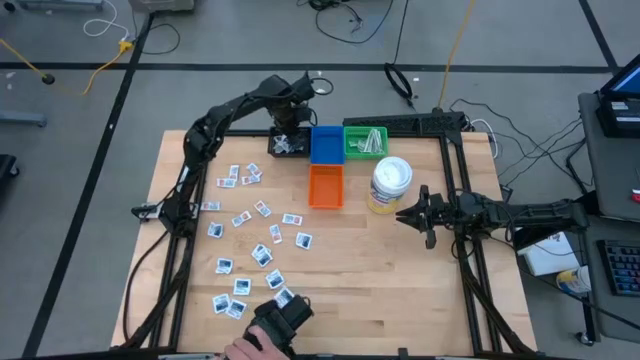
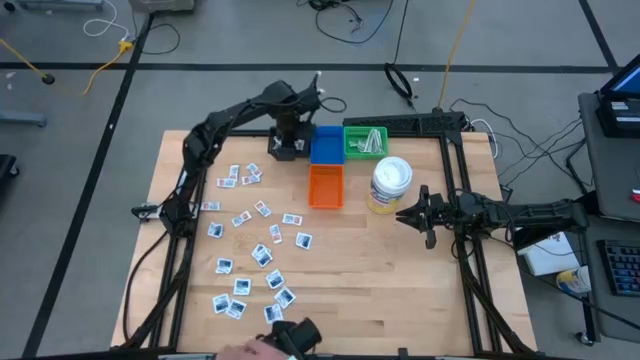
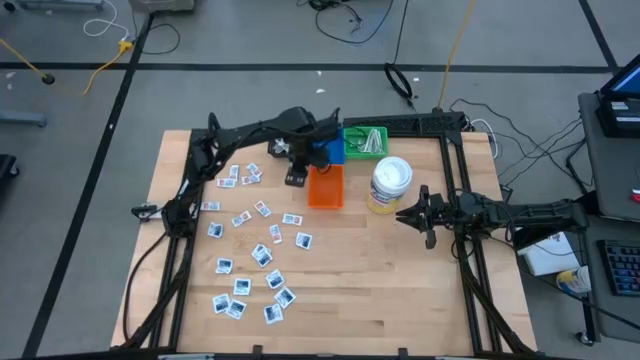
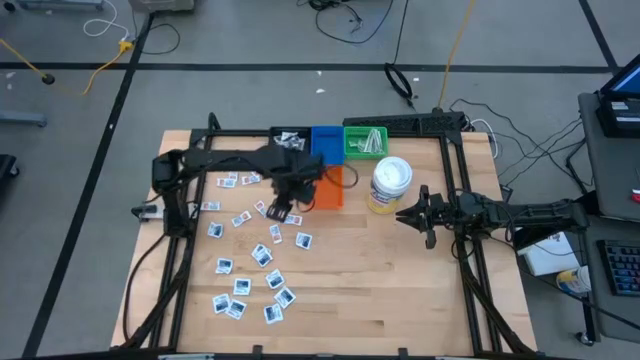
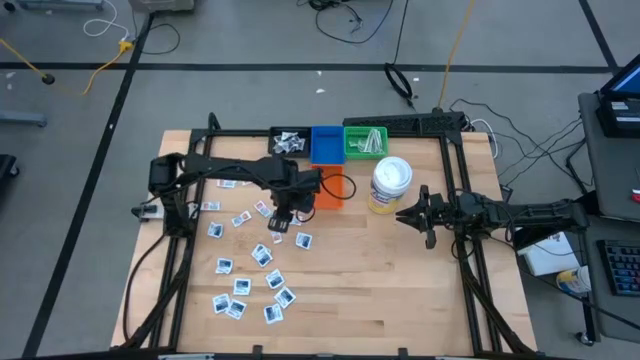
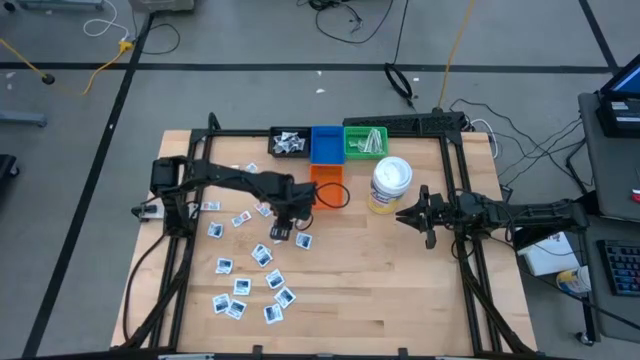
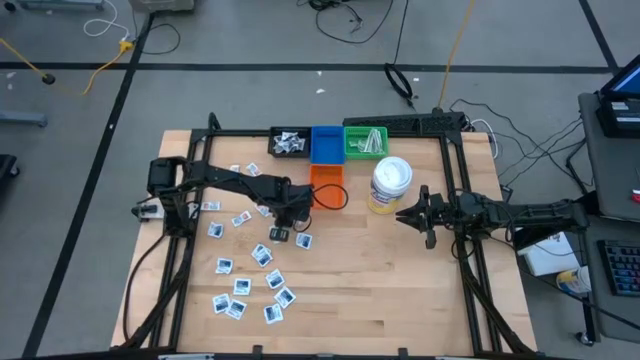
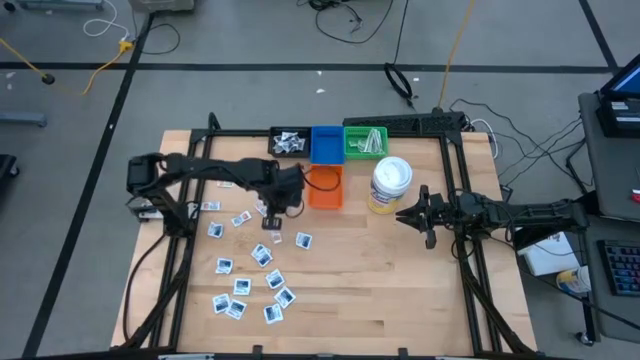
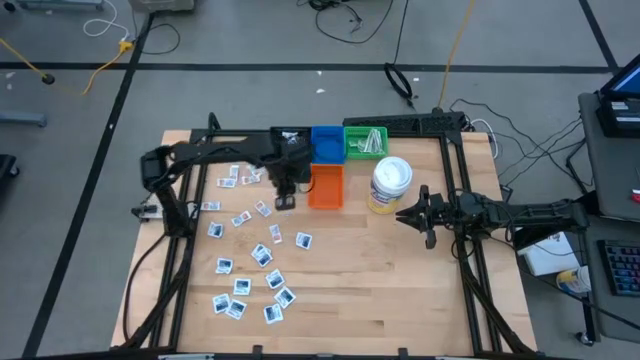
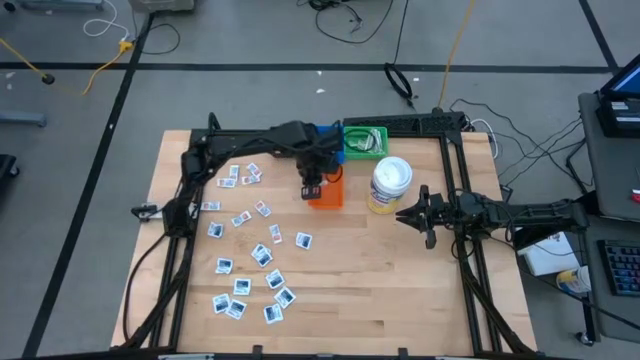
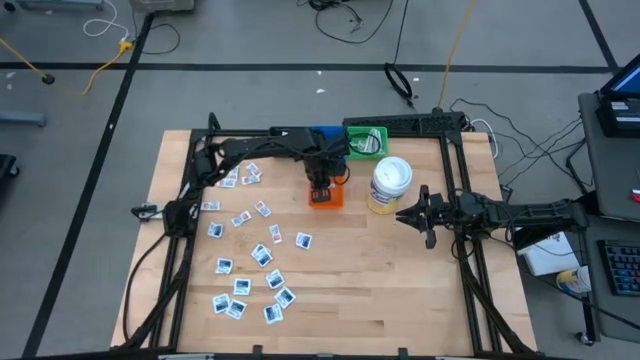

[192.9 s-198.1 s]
Task: Pick & Place First Aid Supplies
Put the orange ointment pack into the orange bin

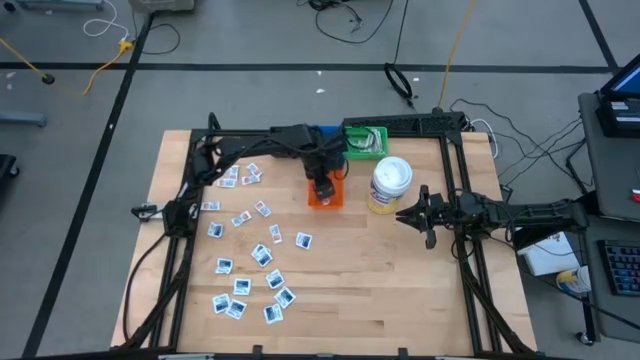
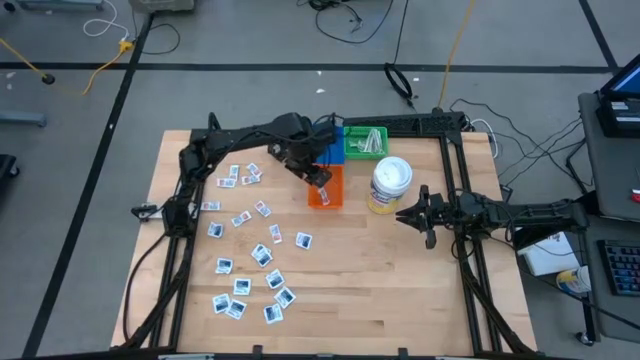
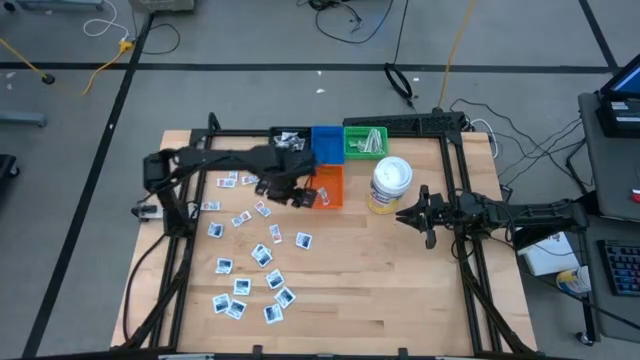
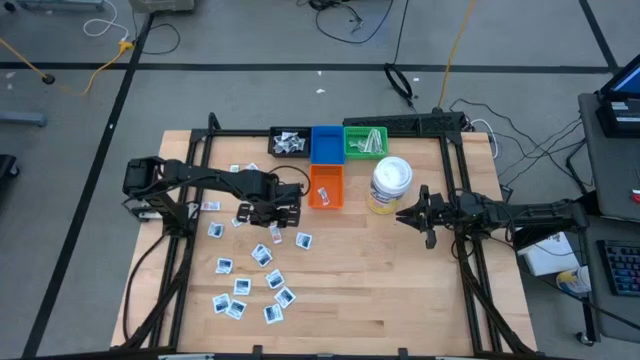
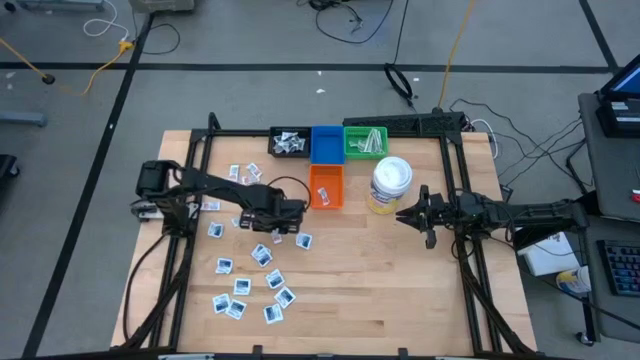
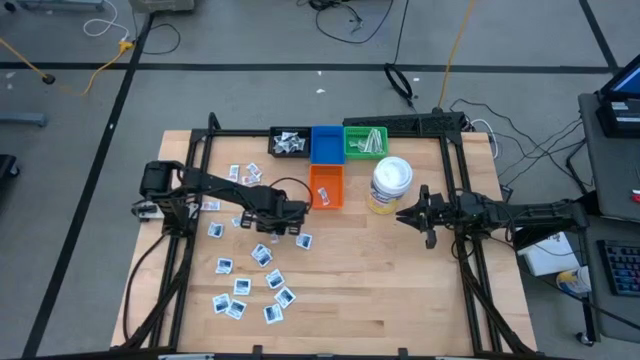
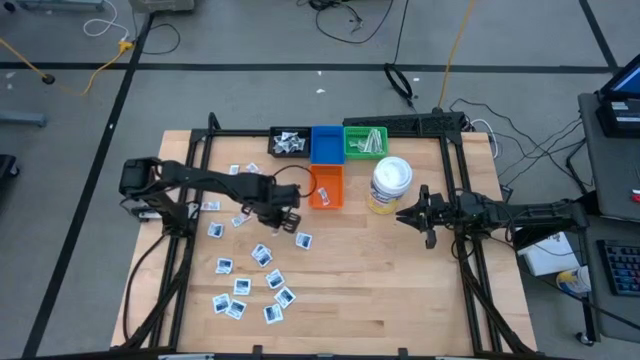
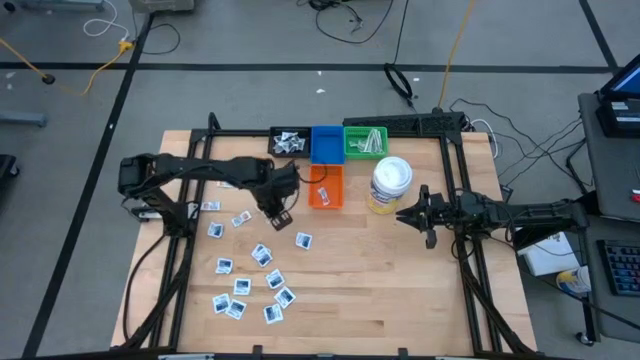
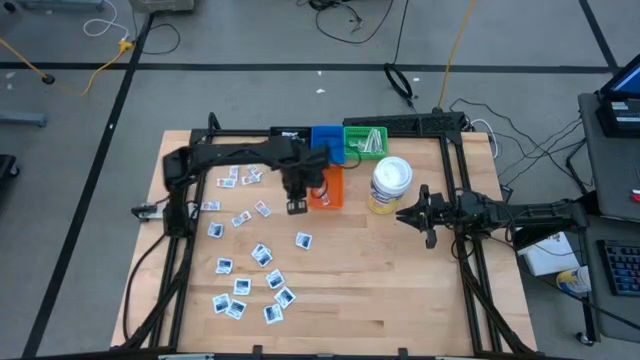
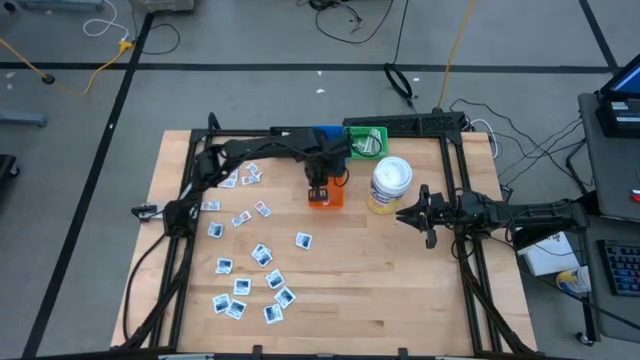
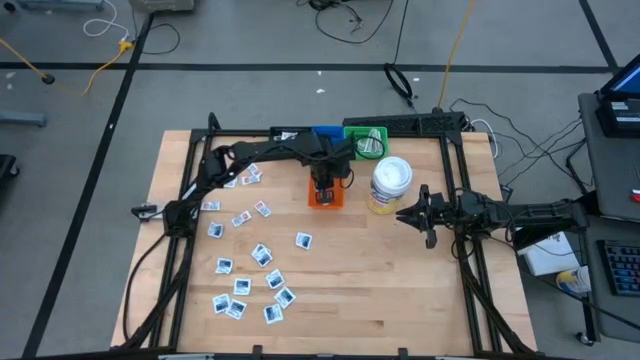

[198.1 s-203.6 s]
Put the orange ointment pack into the orange bin

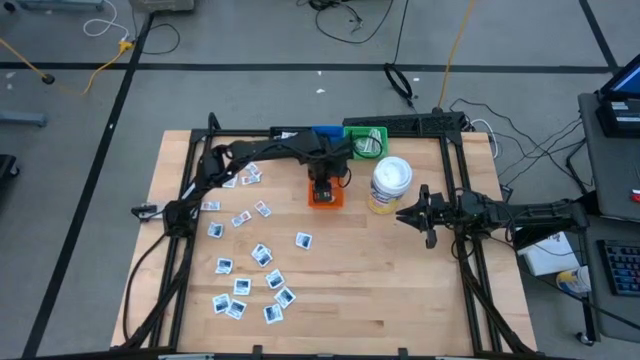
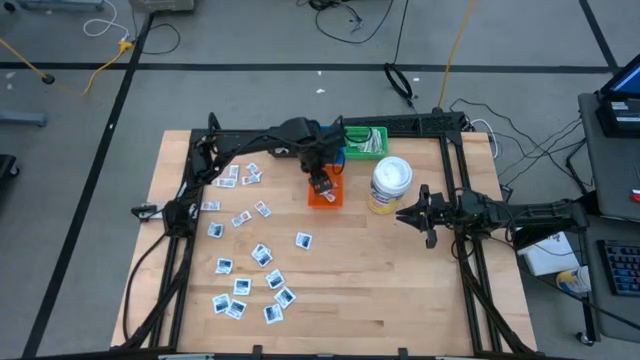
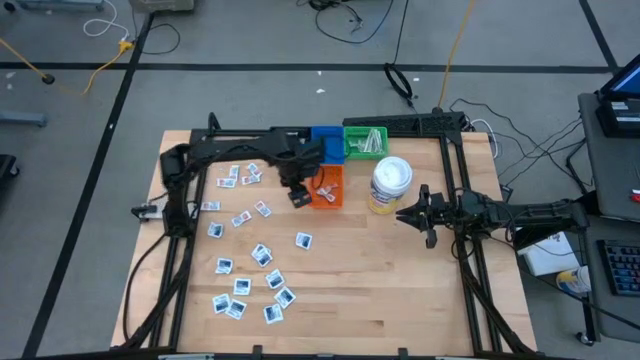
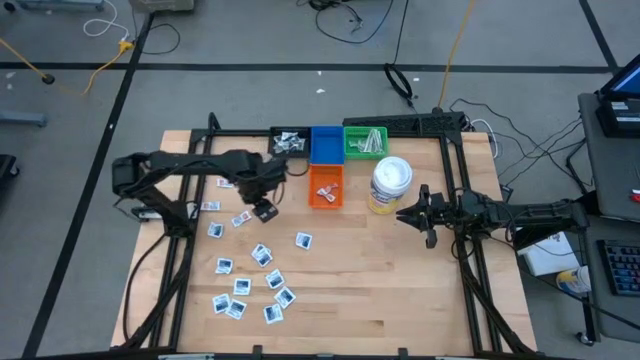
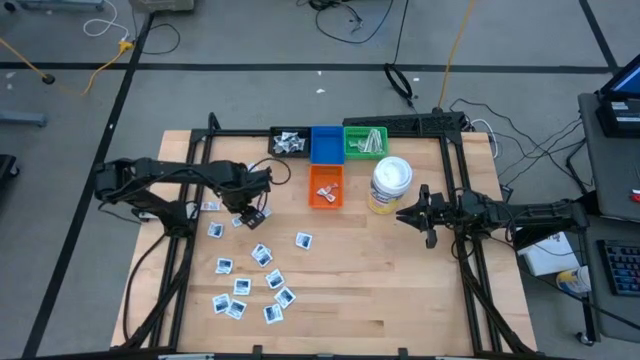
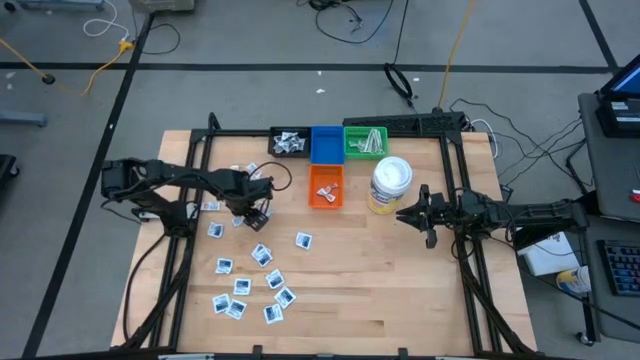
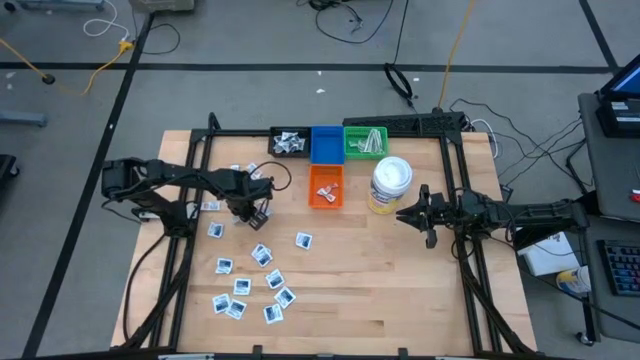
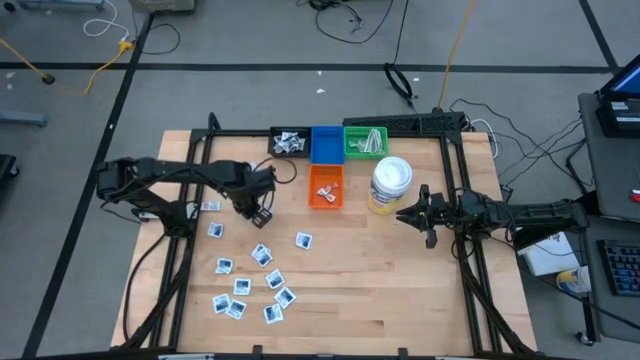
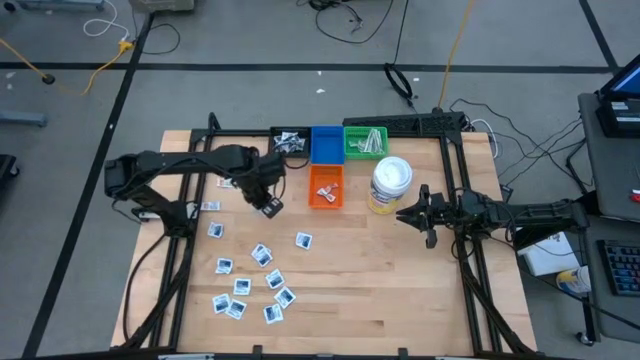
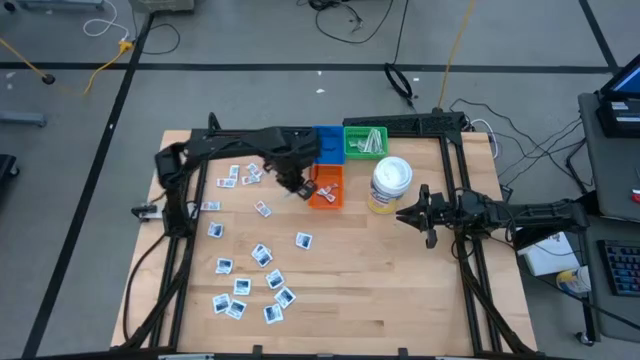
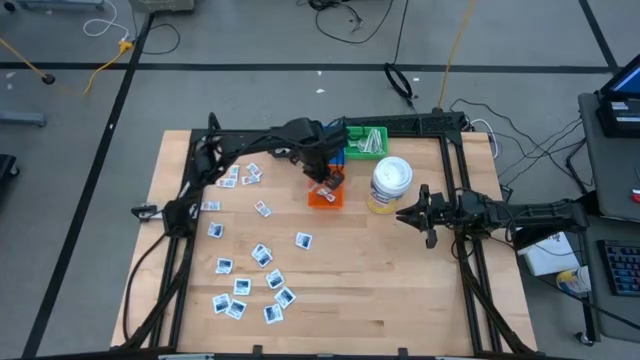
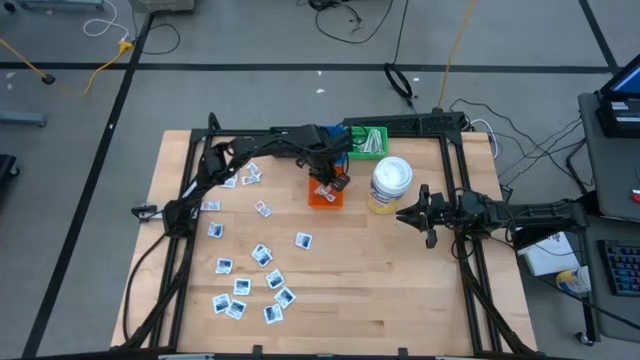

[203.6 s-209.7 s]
Put the orange ointment pack into the orange bin

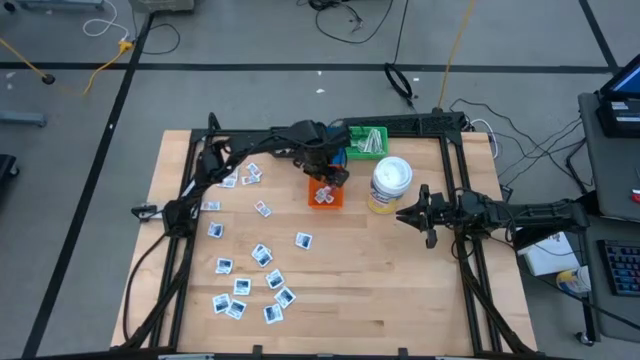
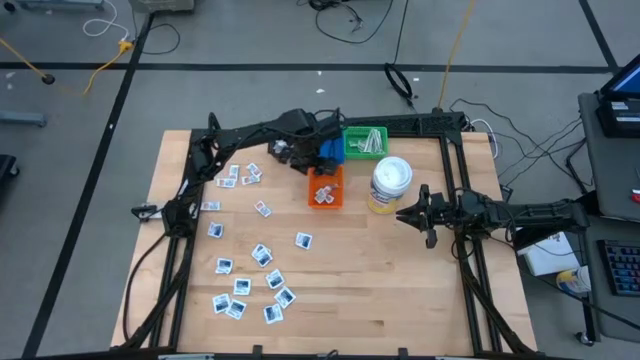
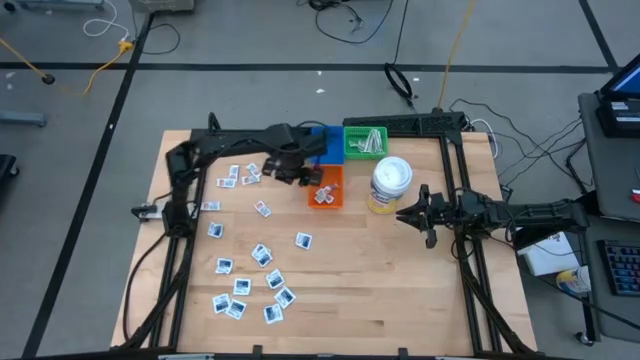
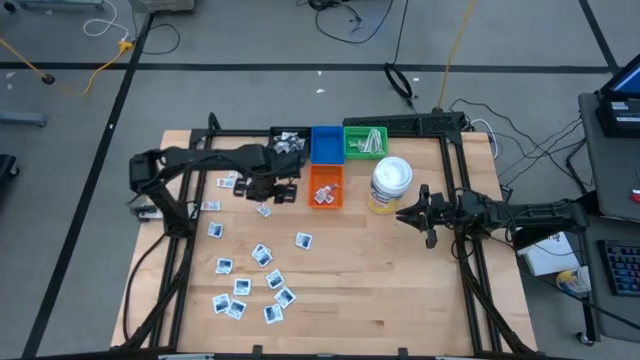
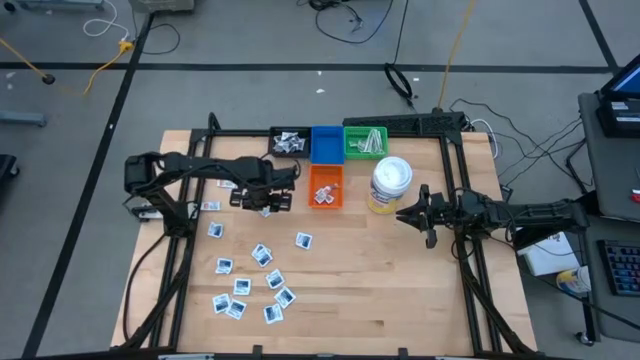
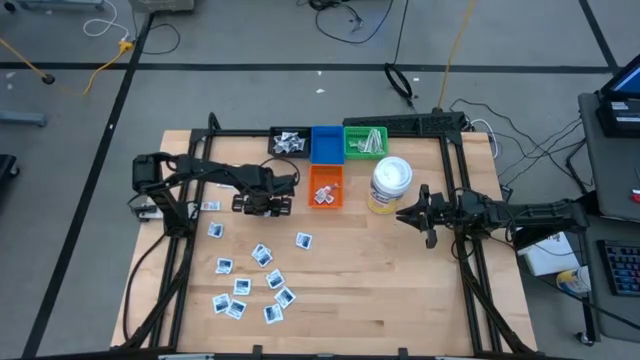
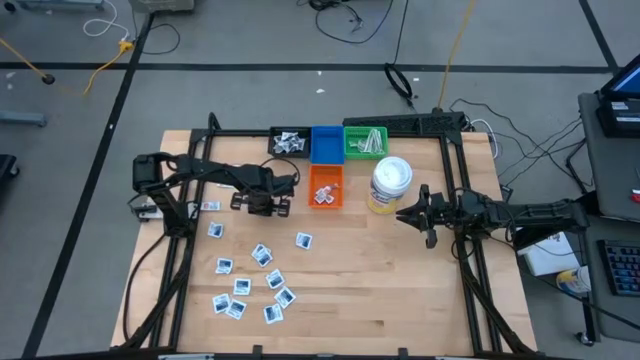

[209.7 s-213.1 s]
Put the orange ointment pack into the orange bin

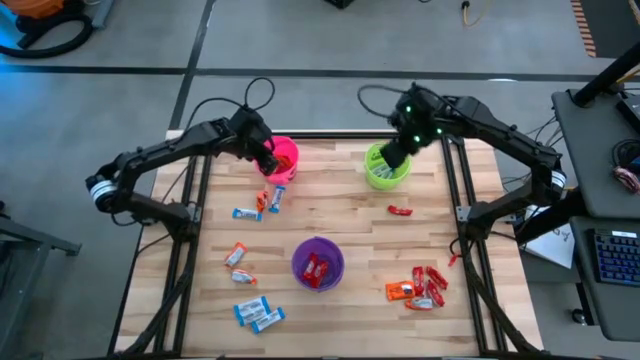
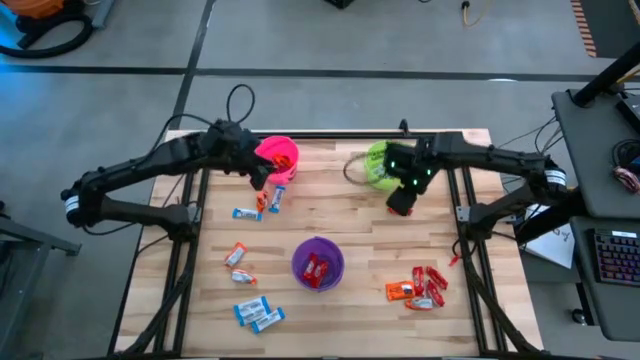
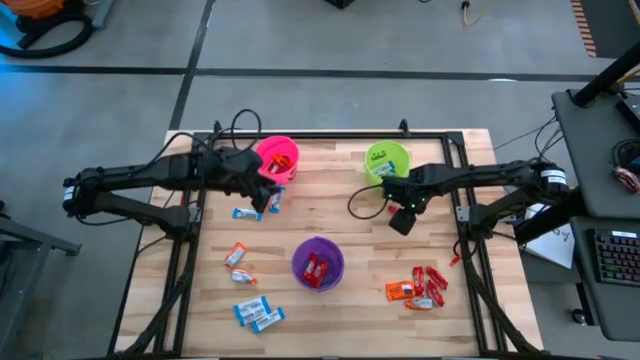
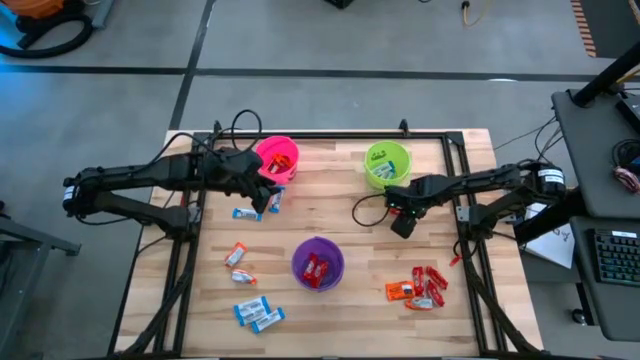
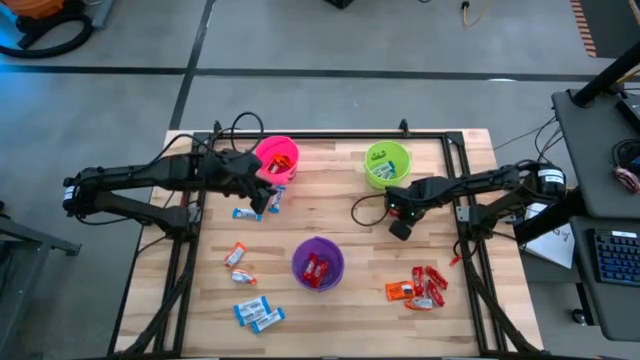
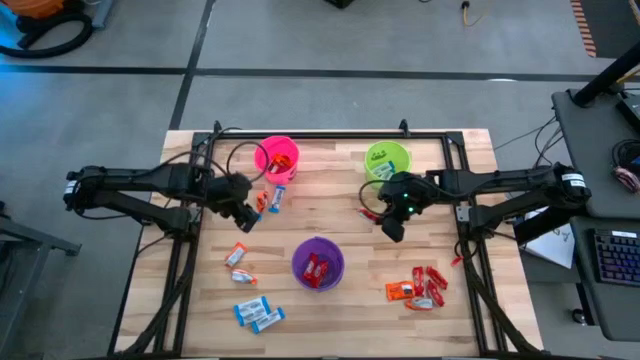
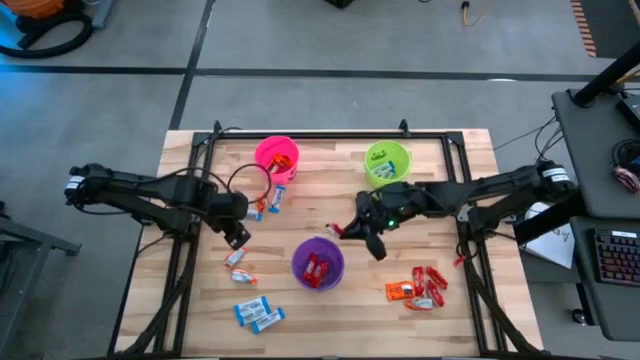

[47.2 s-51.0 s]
Task: Sort candy
Put the red chocolate into the violet bucket
